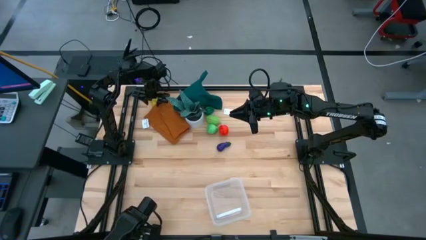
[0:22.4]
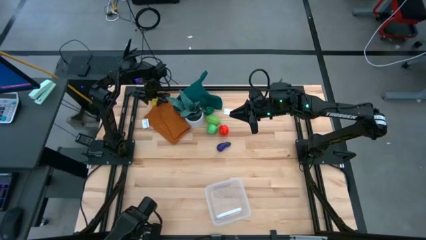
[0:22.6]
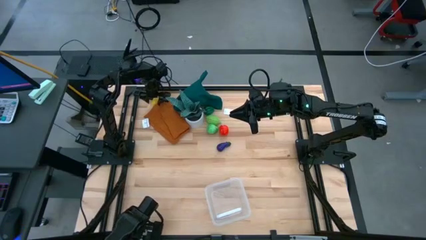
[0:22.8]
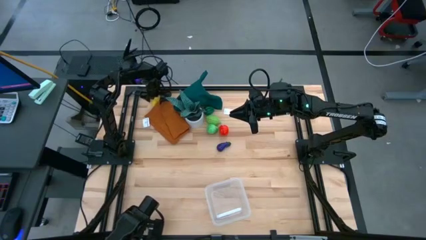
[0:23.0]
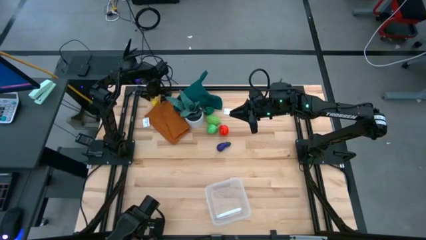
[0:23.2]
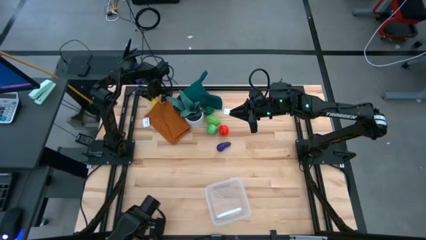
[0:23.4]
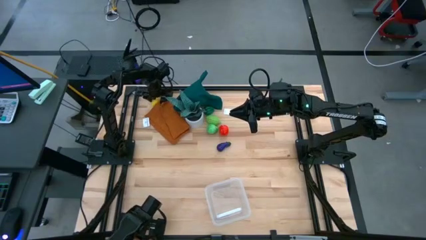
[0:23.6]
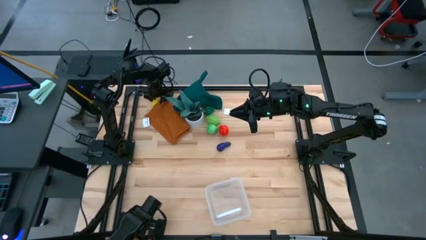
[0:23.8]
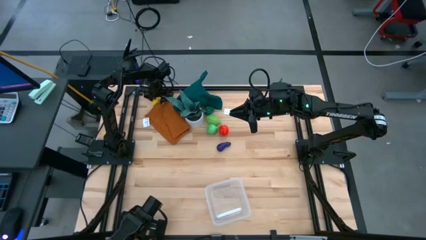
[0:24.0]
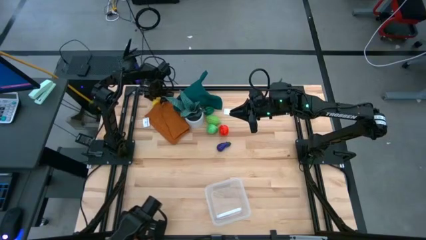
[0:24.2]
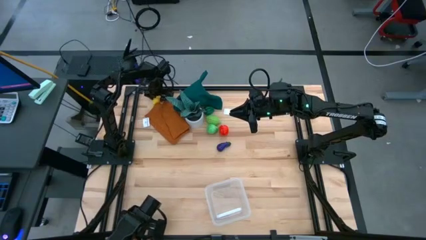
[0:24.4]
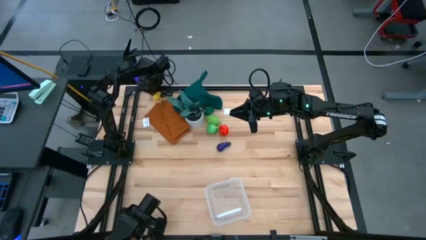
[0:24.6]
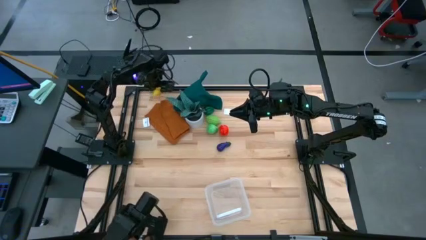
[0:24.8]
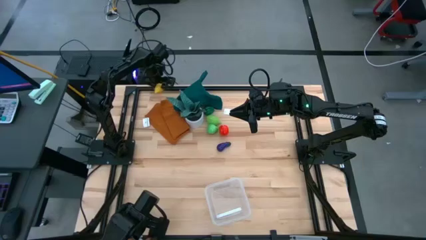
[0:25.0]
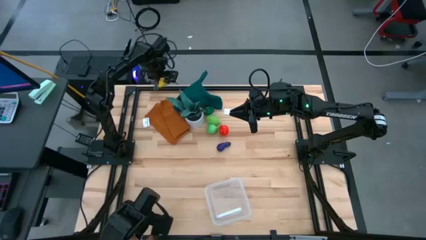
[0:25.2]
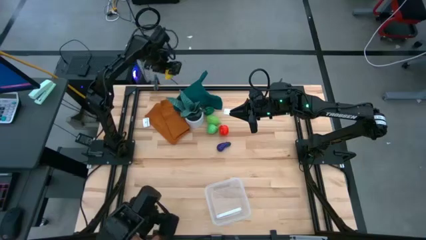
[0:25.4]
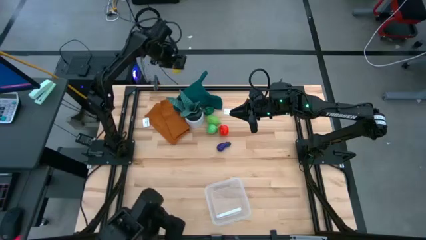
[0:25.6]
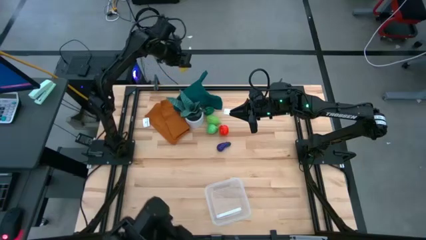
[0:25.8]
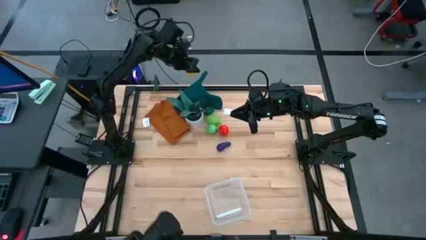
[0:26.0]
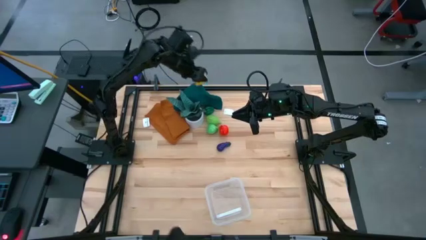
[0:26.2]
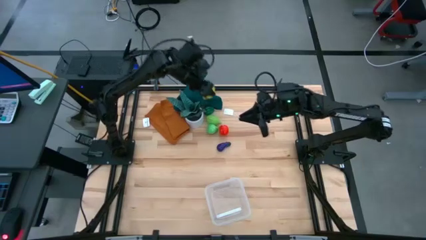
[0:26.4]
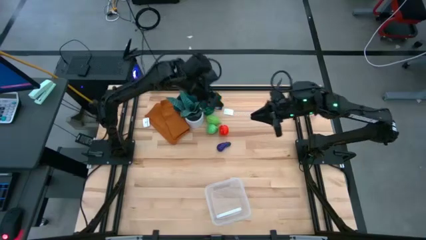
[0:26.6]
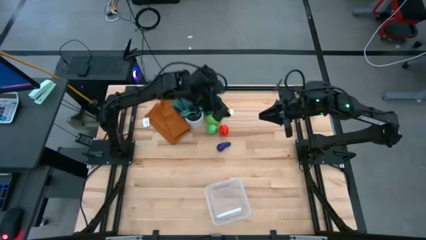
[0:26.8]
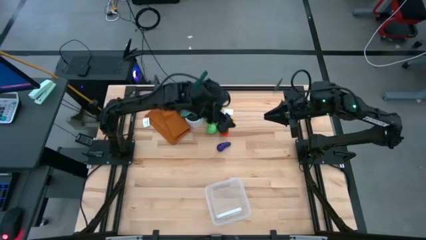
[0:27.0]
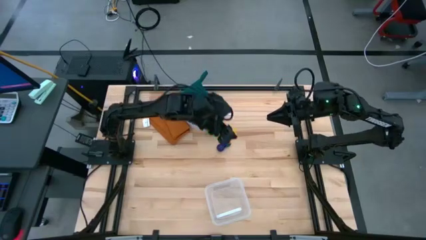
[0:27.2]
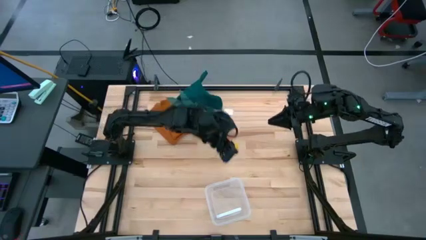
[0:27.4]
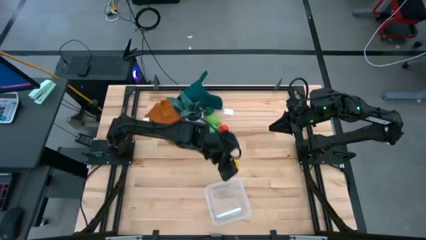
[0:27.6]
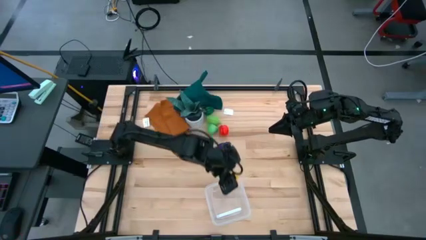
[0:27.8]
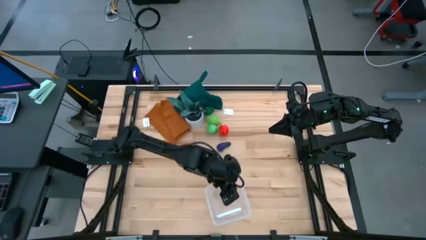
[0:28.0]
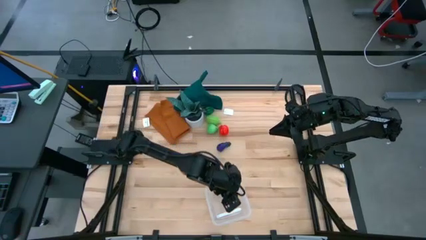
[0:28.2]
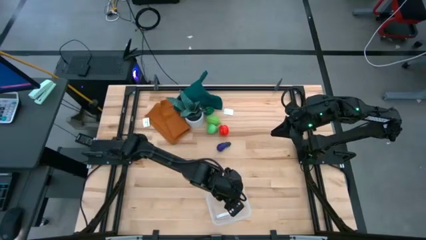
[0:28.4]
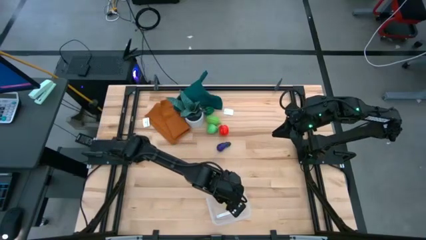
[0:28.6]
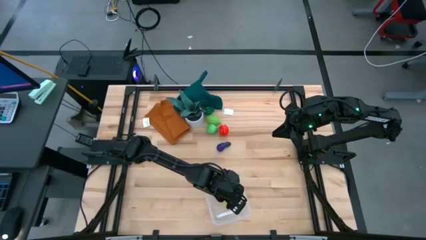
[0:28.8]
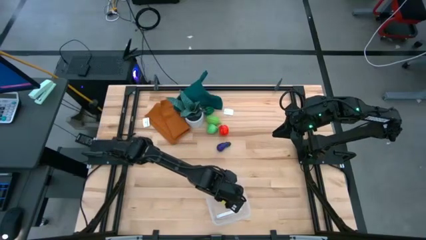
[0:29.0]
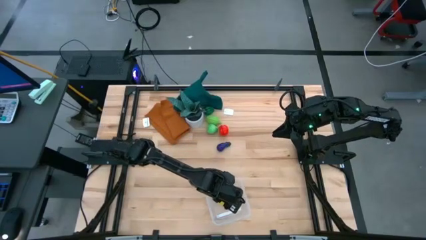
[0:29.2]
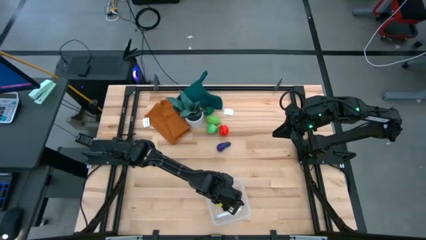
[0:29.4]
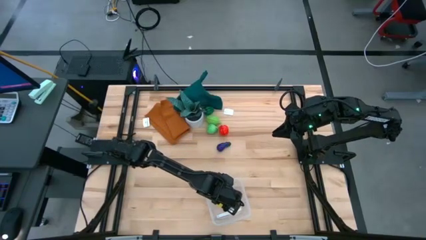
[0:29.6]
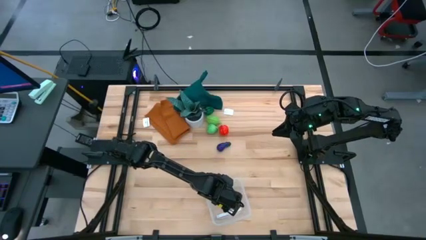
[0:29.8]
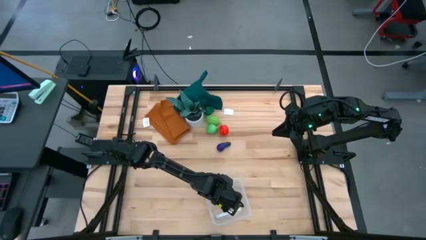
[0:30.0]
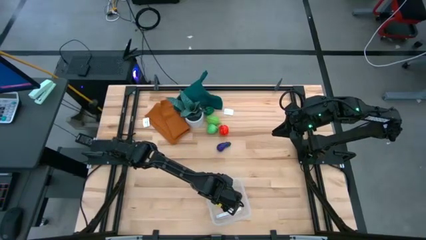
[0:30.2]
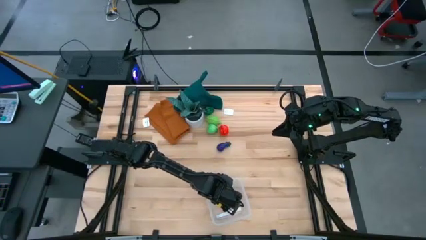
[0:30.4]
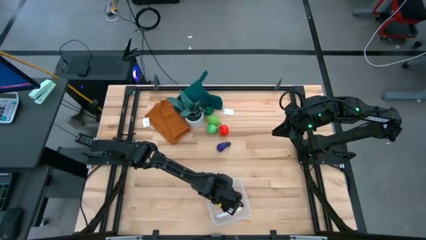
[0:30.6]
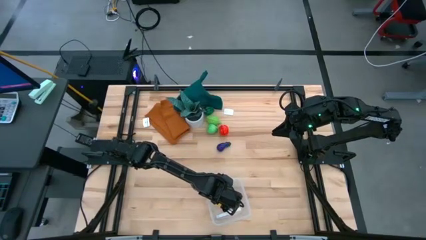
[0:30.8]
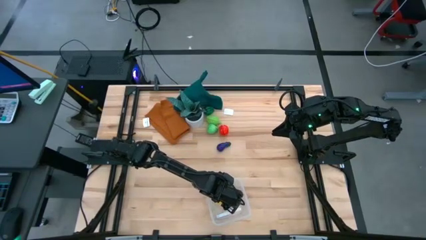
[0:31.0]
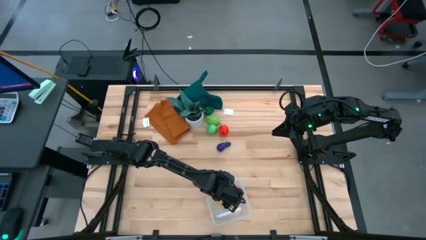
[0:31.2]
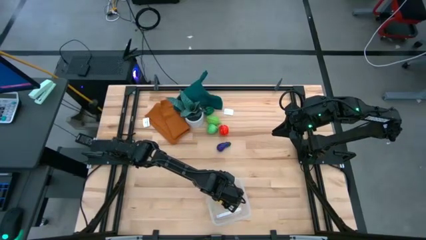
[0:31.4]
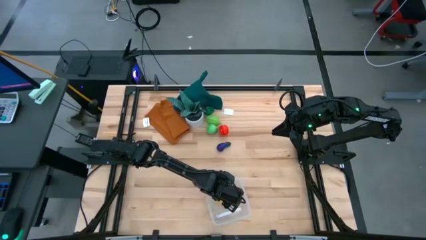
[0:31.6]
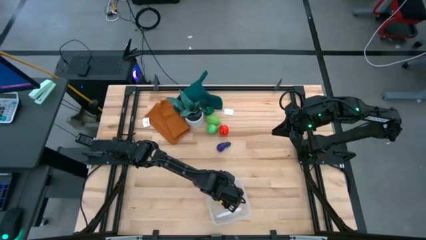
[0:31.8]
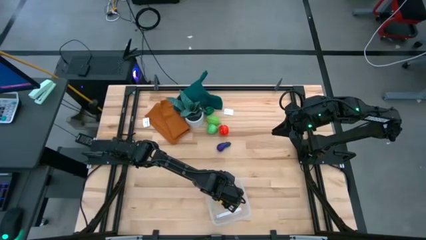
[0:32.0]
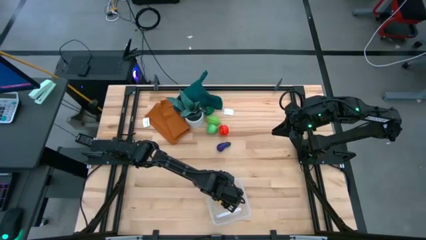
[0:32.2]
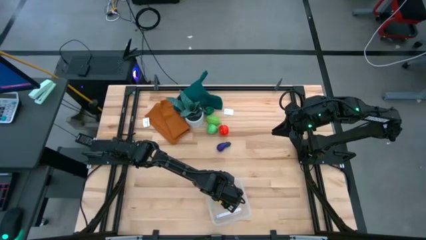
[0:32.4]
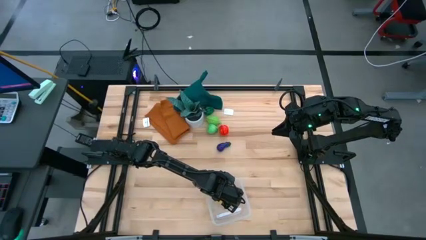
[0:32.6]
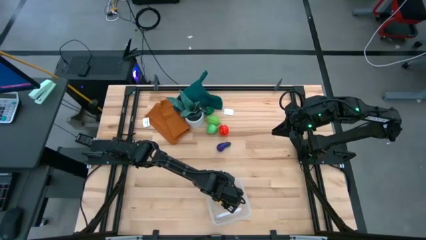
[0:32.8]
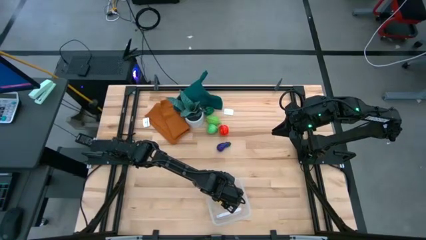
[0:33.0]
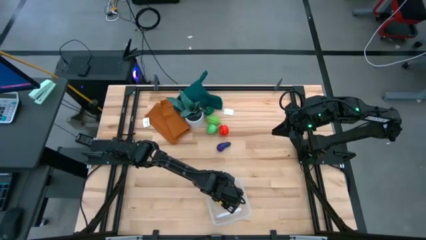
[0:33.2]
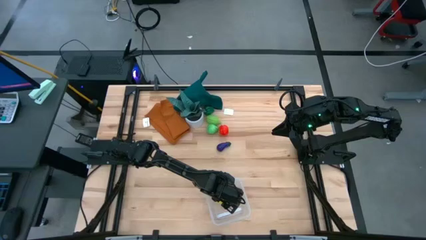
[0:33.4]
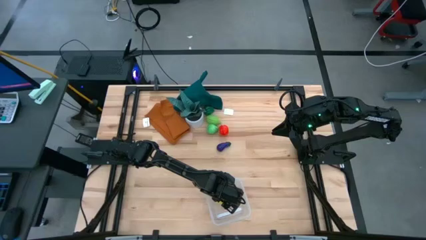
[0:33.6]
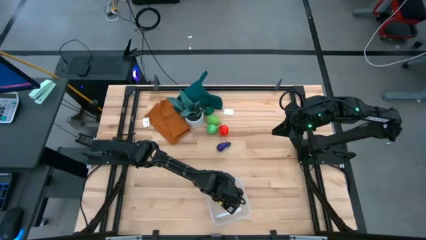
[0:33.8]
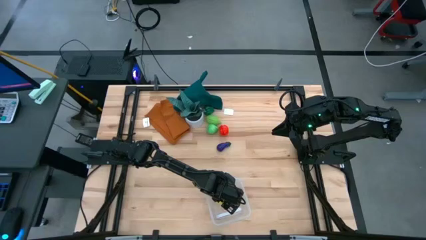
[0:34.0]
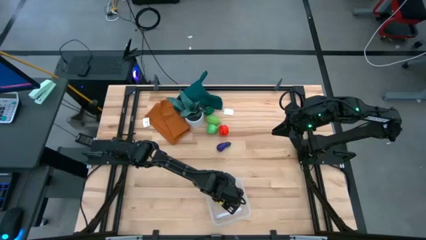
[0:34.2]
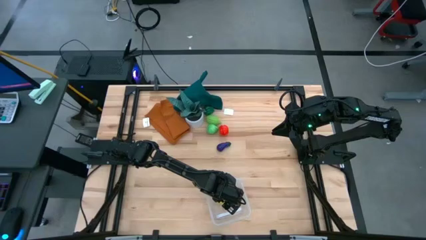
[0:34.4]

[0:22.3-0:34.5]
Task: Pick and placing Produce into tupperware
Put the lemon into the transparent bin
